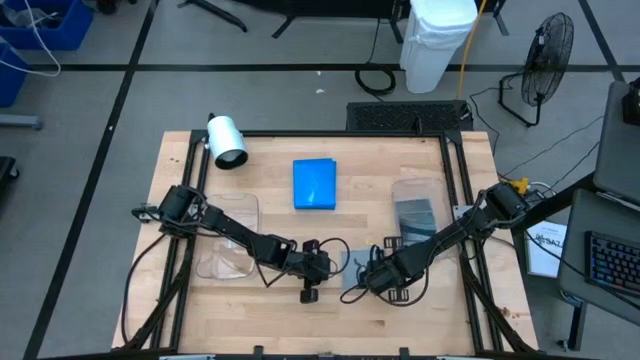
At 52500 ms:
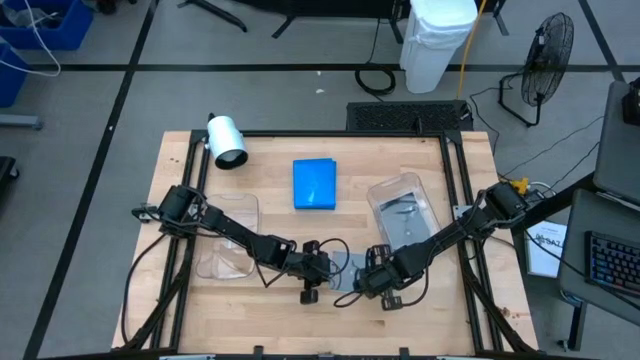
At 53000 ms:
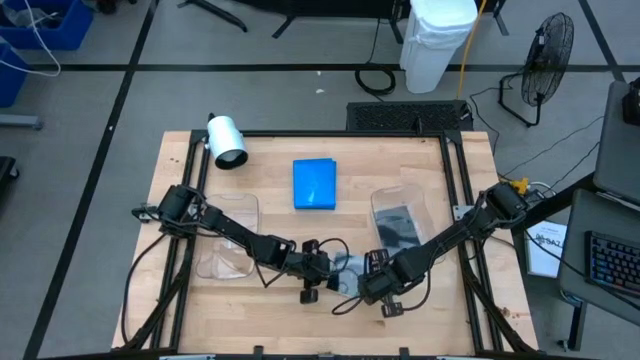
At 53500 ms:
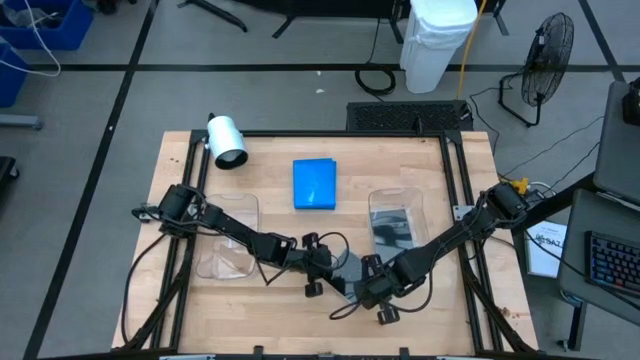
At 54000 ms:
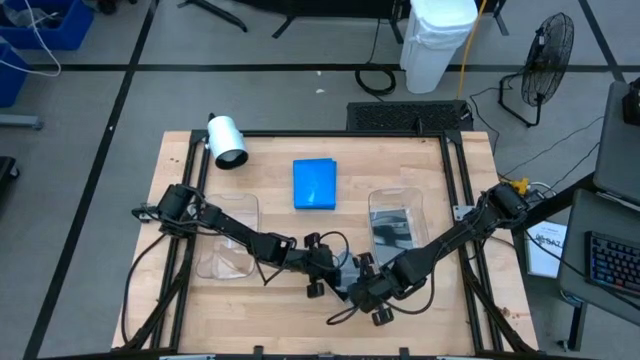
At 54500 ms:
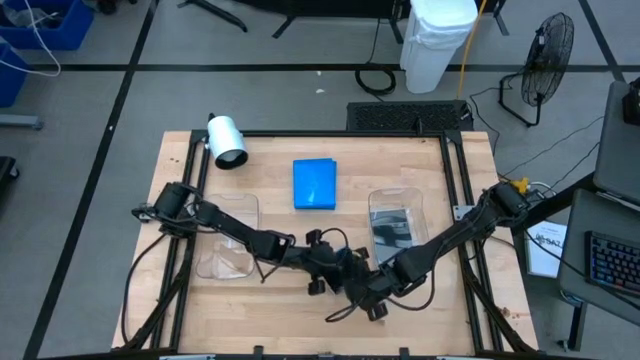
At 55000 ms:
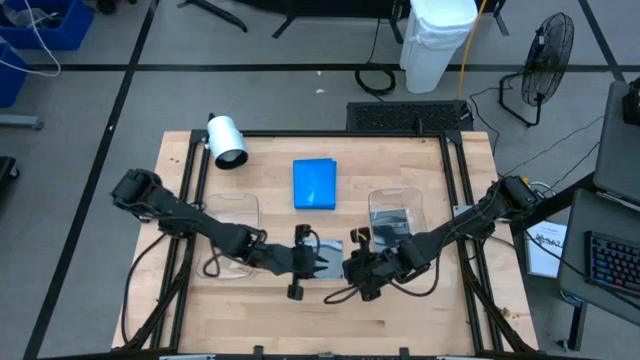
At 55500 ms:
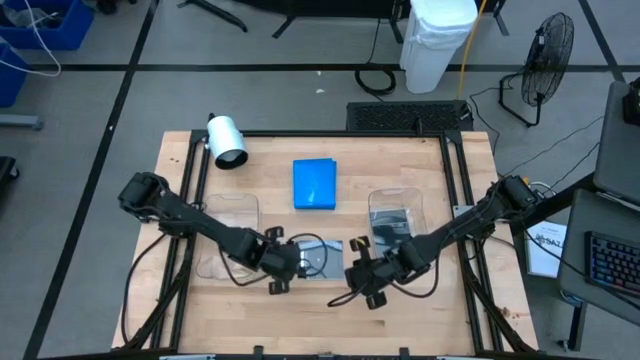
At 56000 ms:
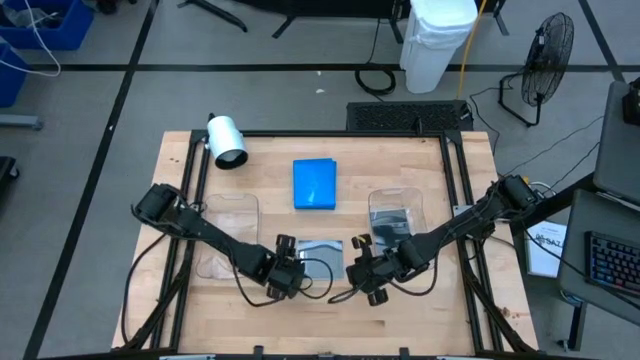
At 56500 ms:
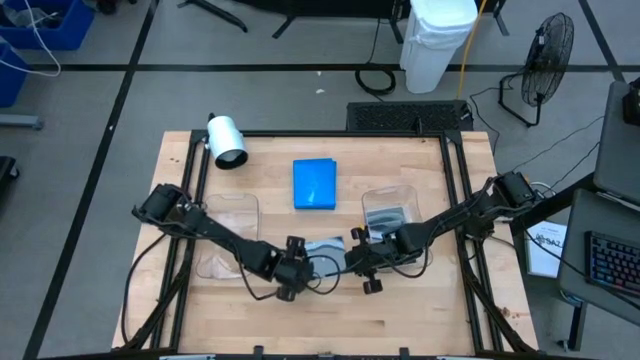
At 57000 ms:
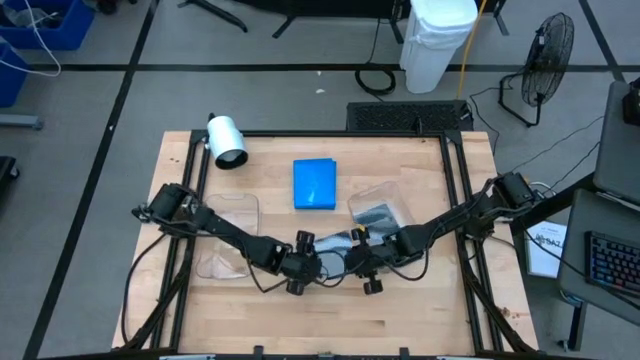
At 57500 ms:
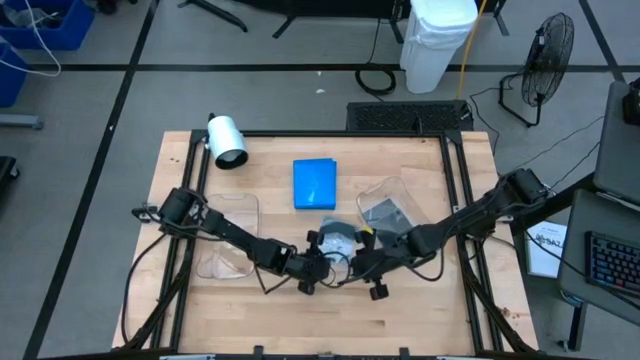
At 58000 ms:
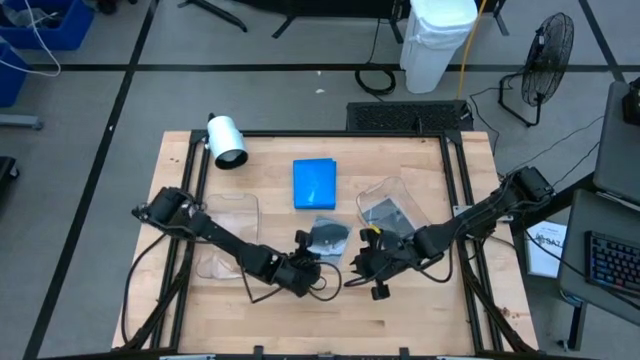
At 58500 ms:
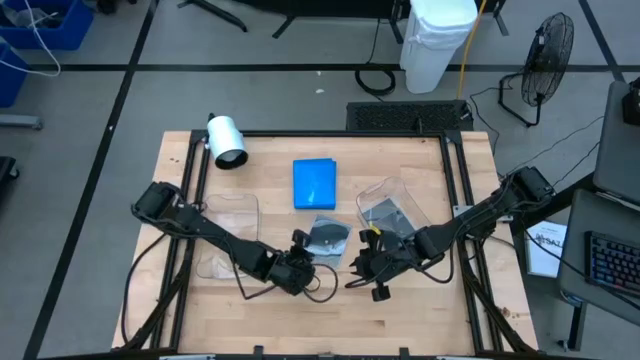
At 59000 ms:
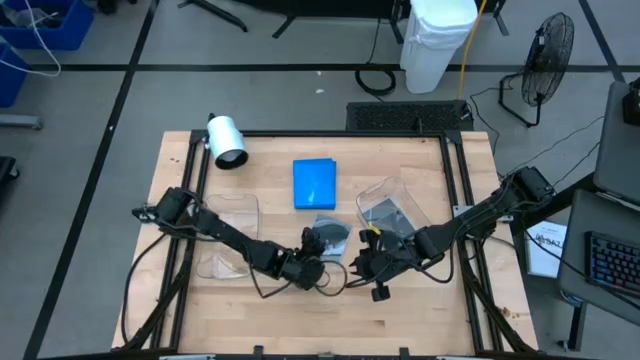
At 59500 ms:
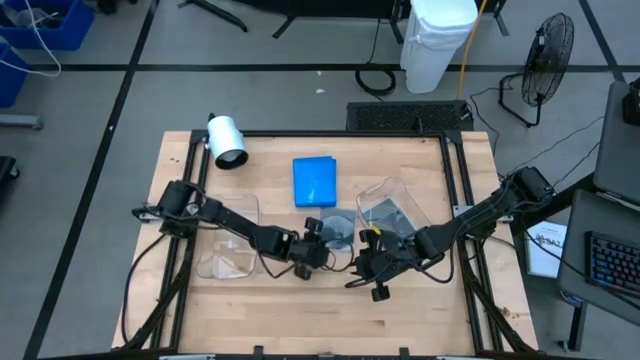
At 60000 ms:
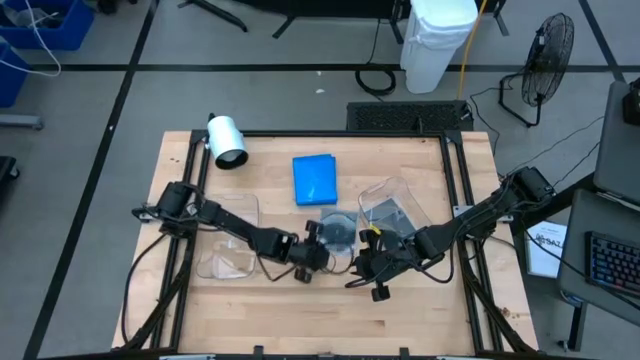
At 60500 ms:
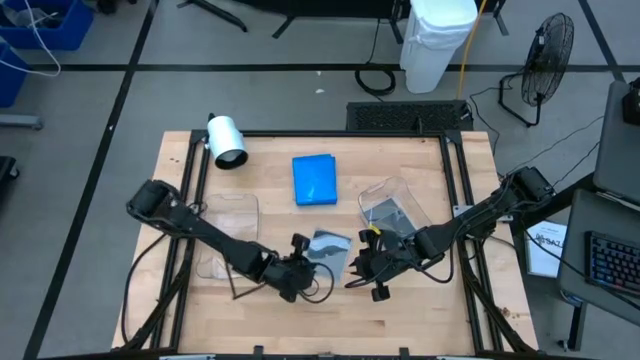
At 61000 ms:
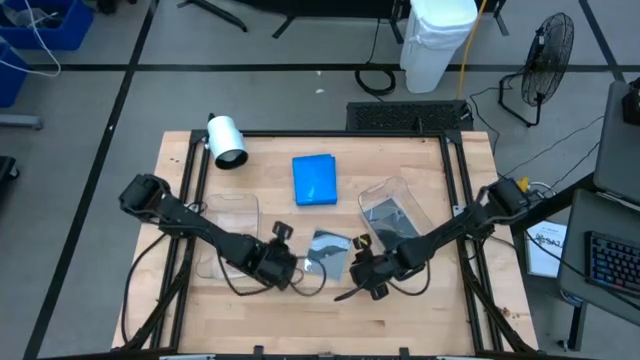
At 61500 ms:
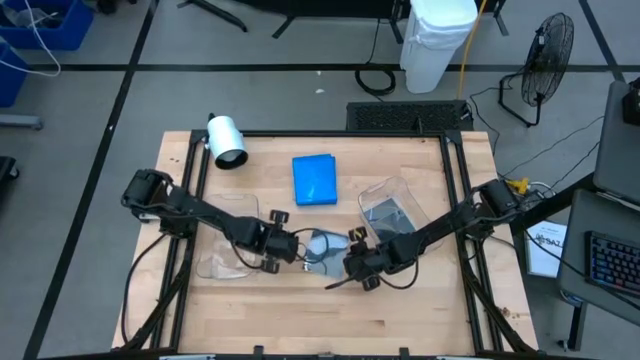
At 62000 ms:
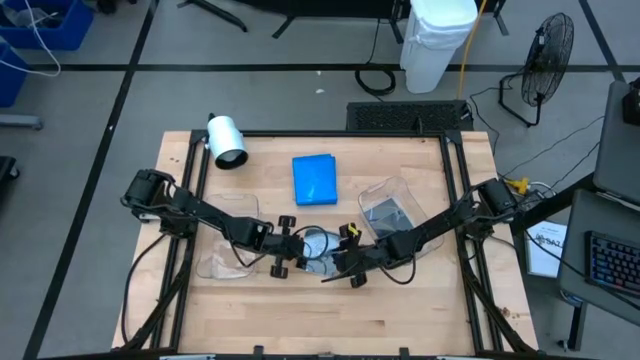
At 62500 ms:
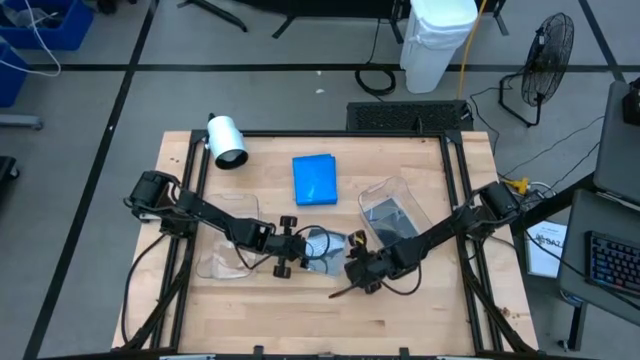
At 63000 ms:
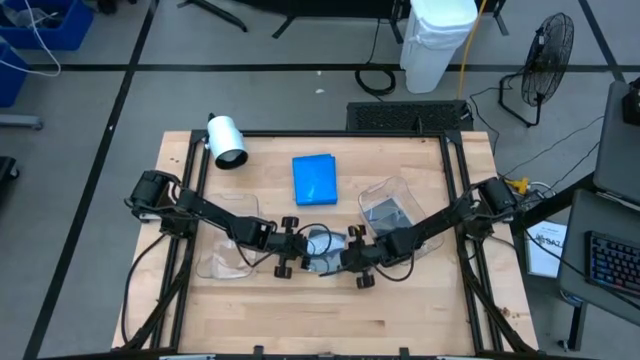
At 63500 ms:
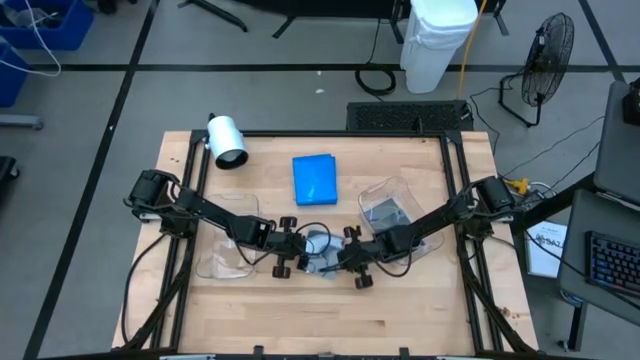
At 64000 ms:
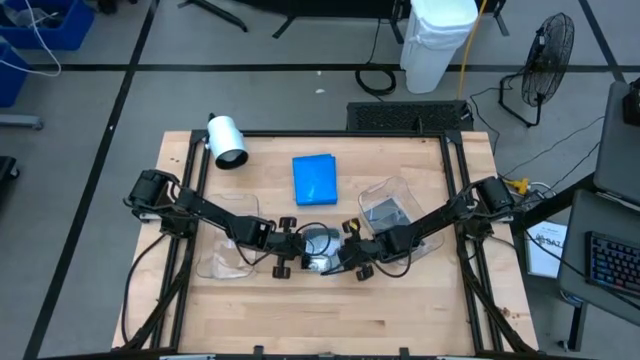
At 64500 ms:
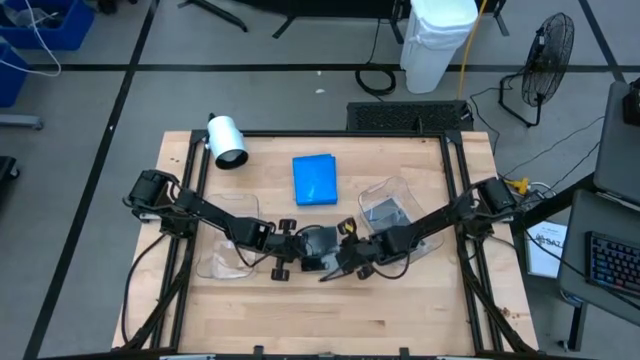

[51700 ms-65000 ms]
Task: Pick & place jewel cases by type
Put the black CD case into the right transparent bin

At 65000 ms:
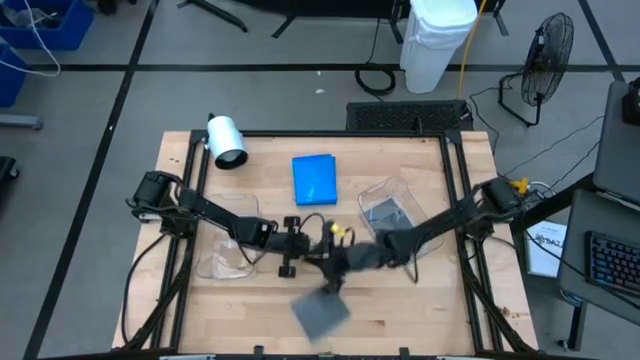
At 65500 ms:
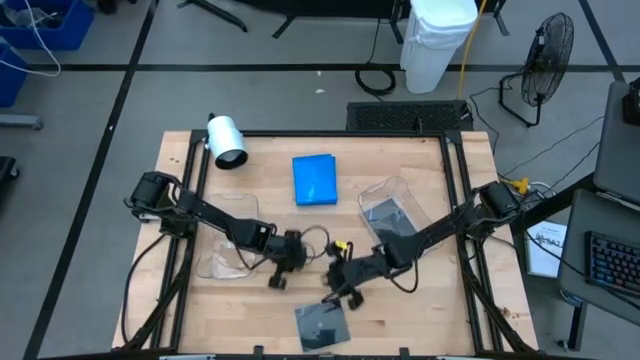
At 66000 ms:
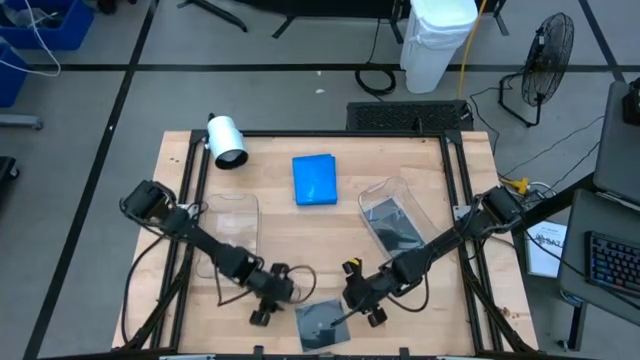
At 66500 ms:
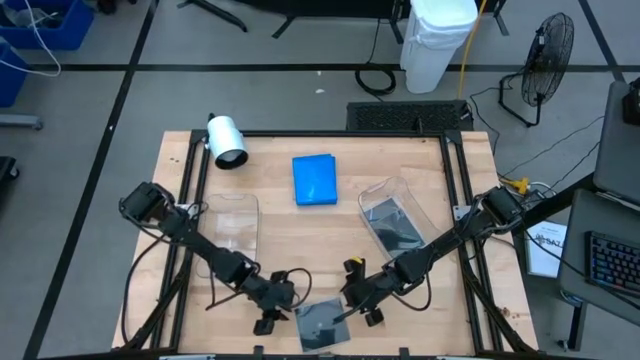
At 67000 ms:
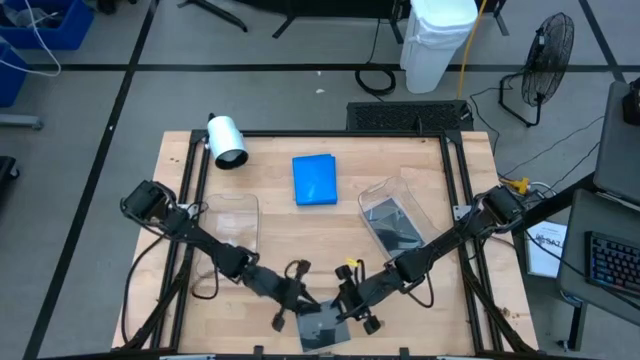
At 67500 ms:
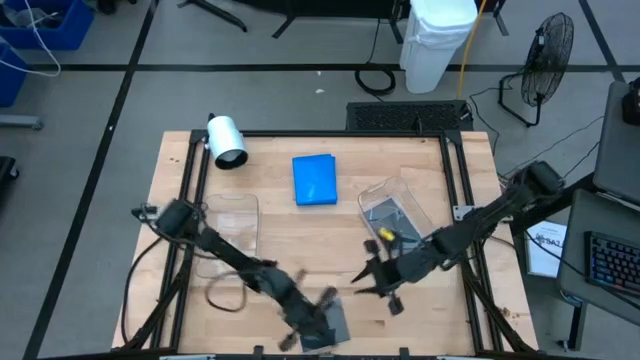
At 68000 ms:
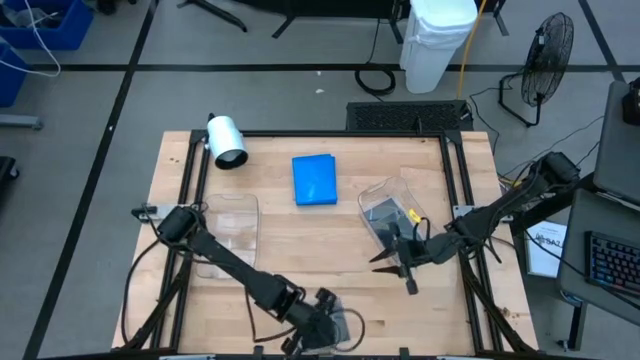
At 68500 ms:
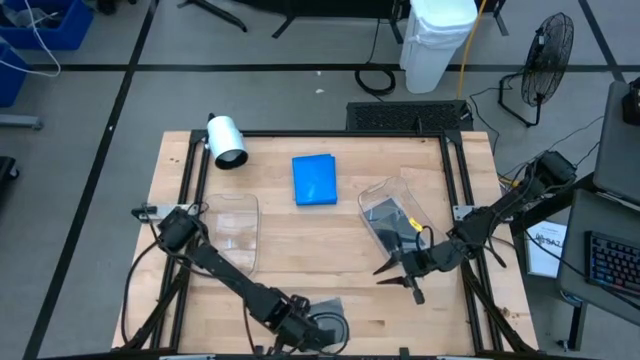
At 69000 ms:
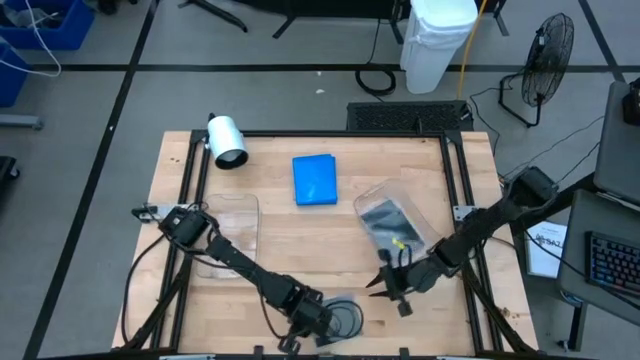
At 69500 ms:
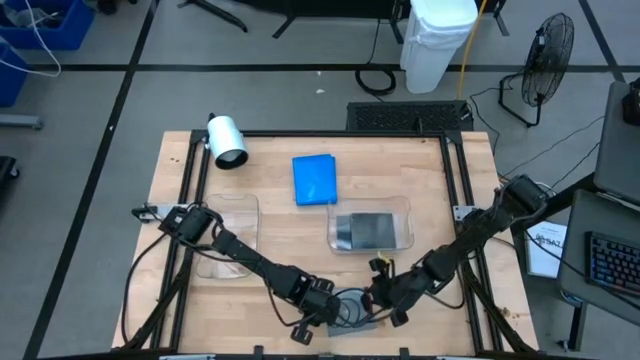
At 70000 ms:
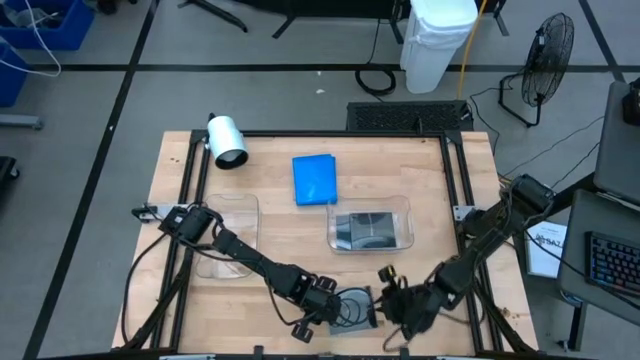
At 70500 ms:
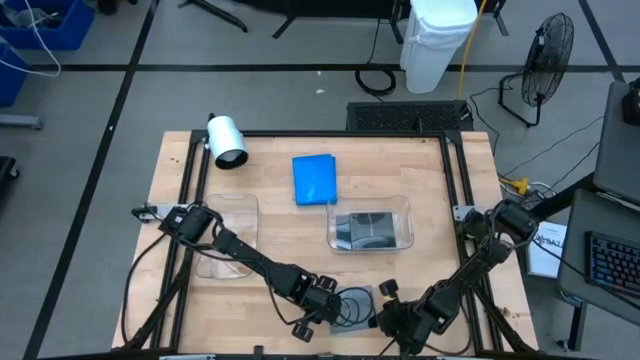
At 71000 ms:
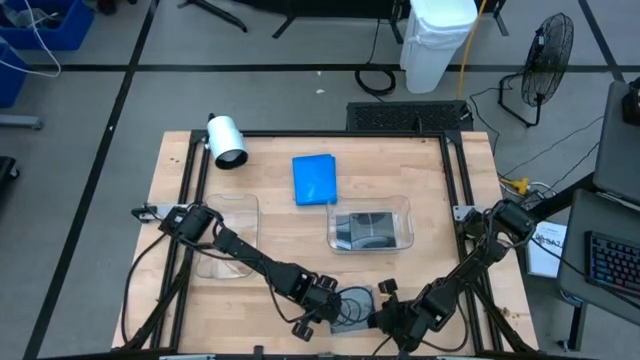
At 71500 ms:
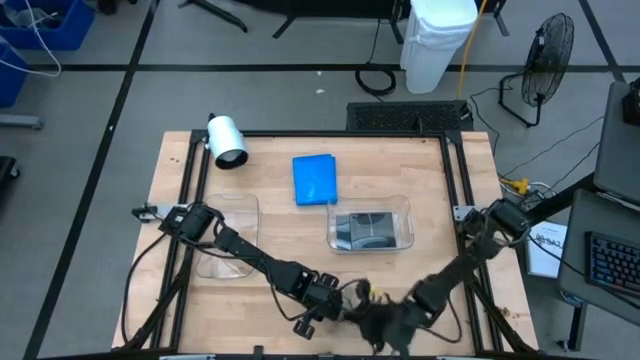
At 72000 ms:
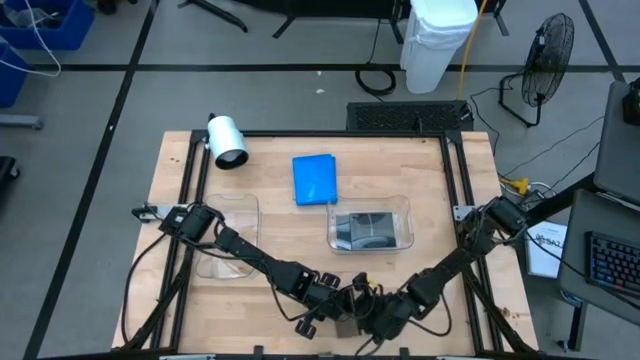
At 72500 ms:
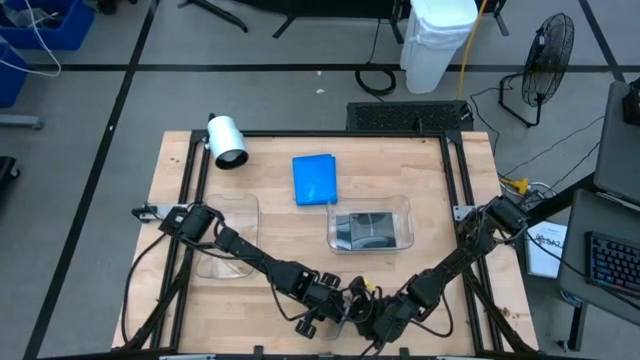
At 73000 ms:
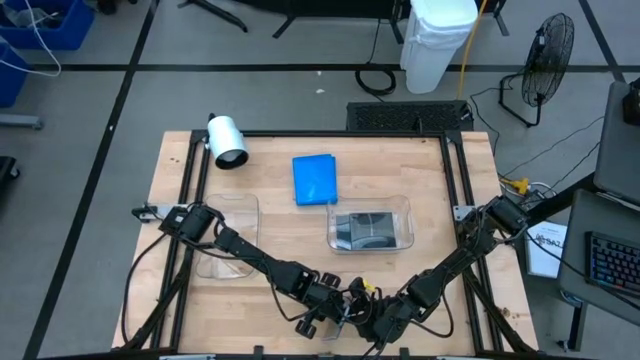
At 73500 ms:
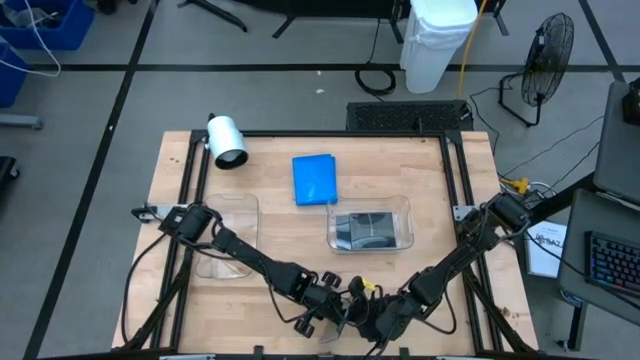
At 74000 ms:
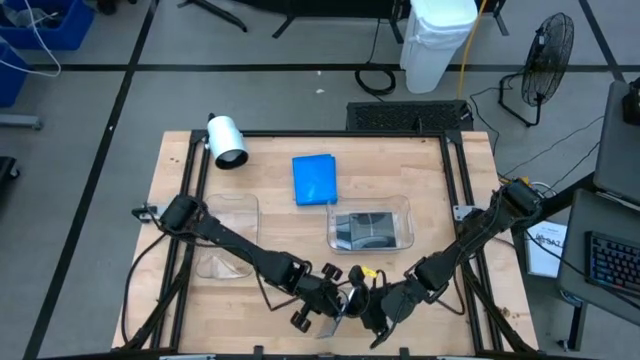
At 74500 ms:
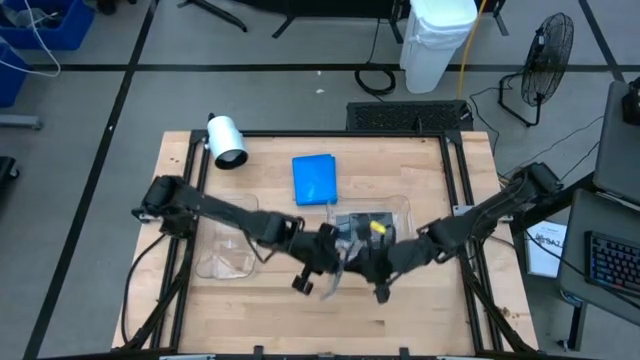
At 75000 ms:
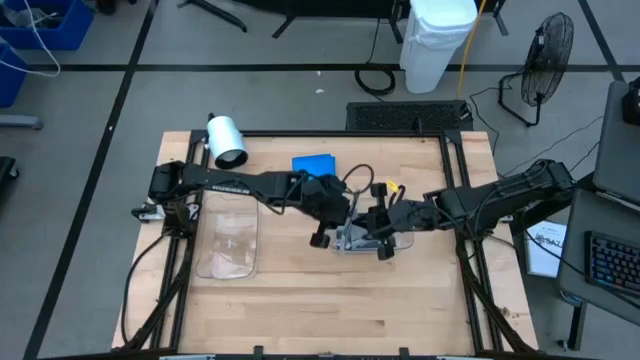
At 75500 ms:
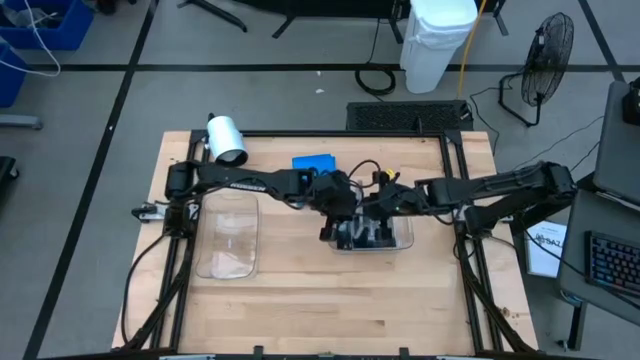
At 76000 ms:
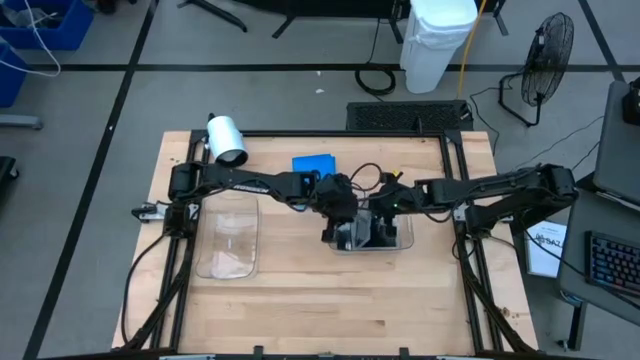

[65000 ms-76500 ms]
Put the black CD case into the right transparent bin
